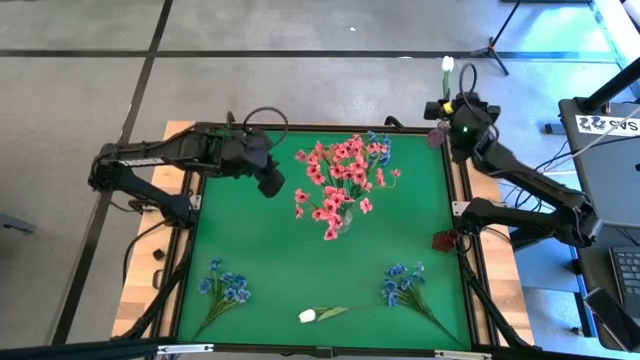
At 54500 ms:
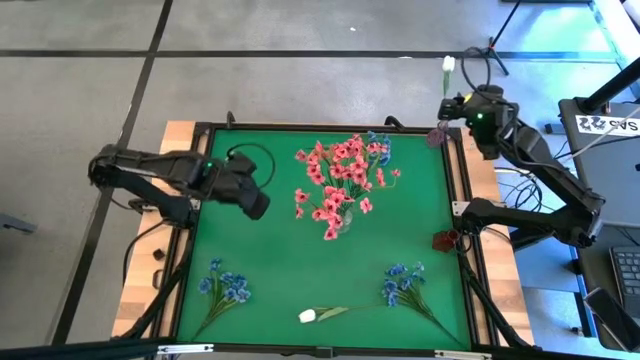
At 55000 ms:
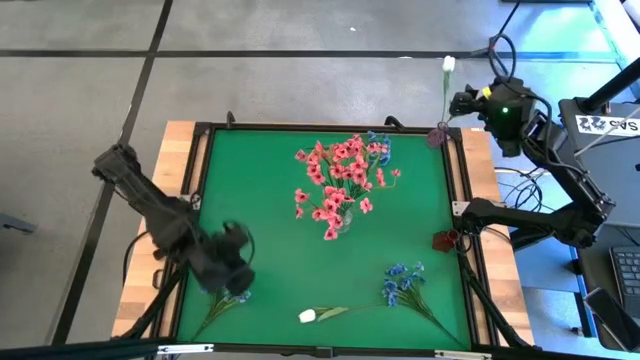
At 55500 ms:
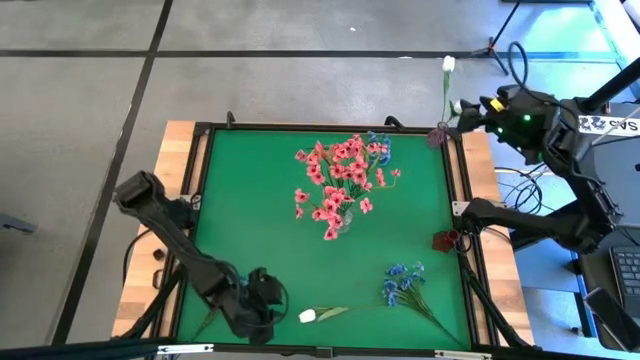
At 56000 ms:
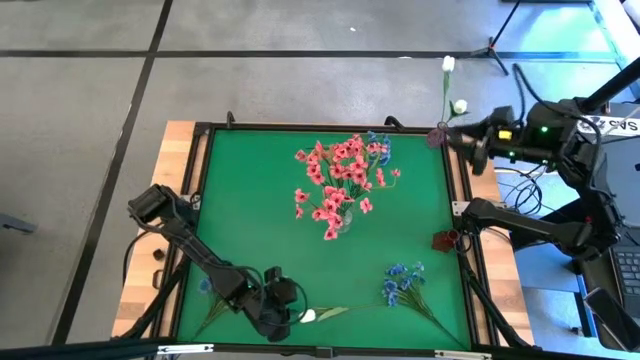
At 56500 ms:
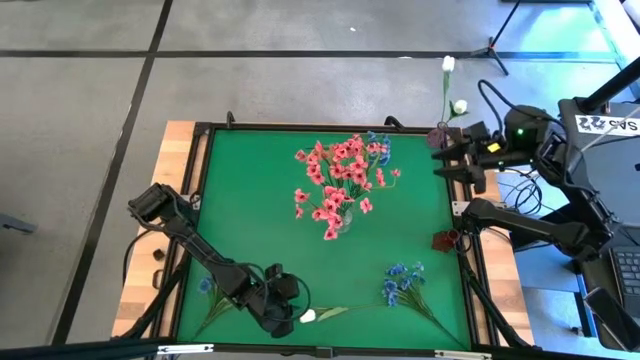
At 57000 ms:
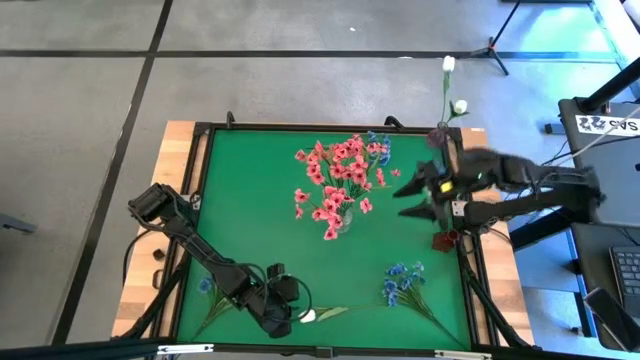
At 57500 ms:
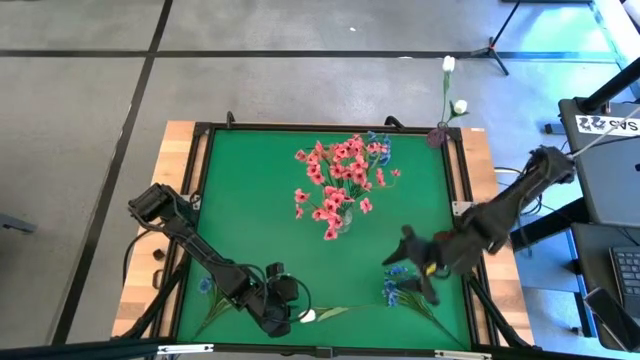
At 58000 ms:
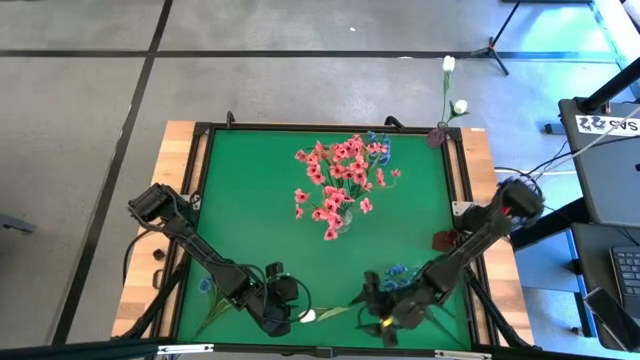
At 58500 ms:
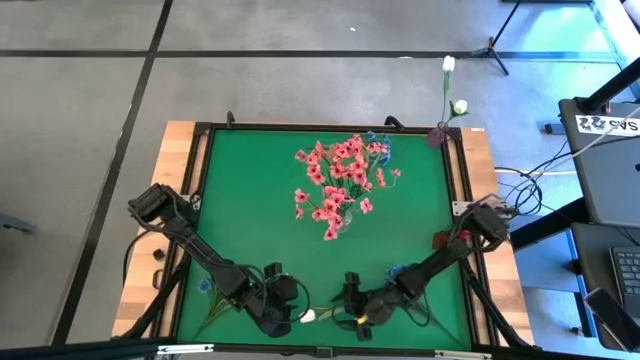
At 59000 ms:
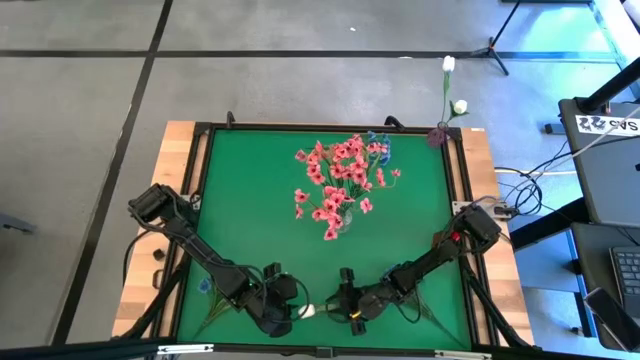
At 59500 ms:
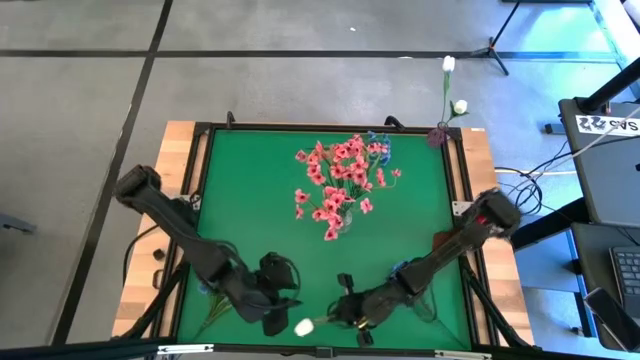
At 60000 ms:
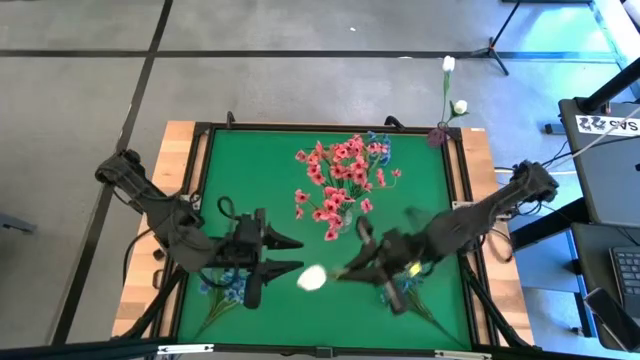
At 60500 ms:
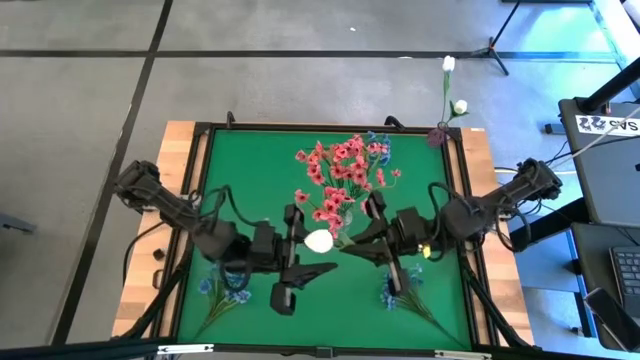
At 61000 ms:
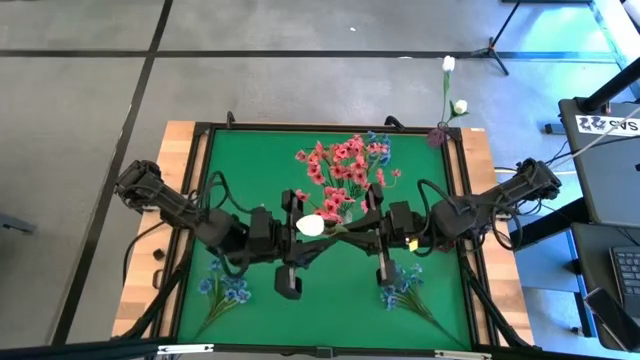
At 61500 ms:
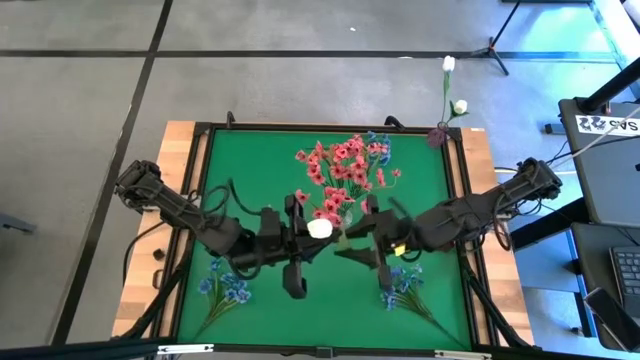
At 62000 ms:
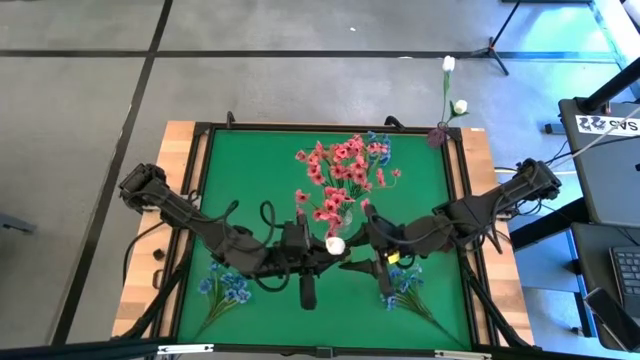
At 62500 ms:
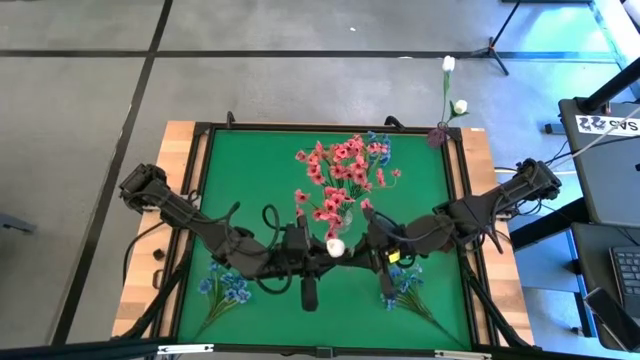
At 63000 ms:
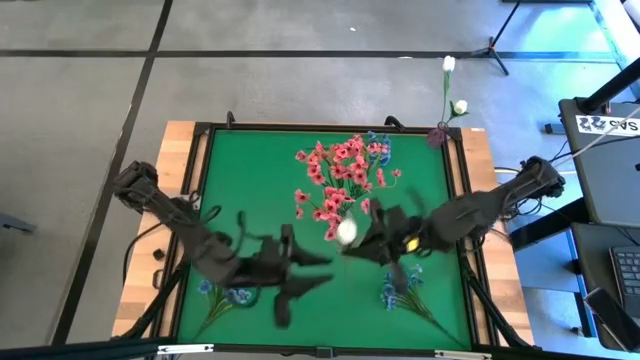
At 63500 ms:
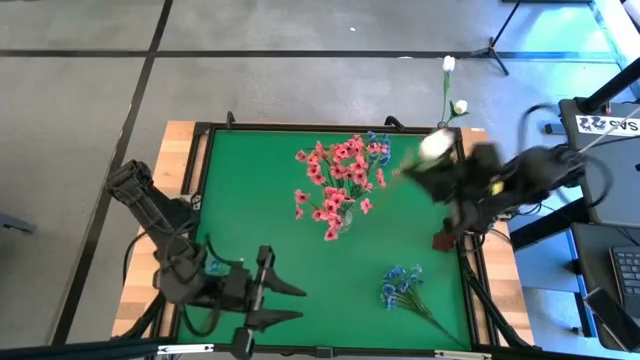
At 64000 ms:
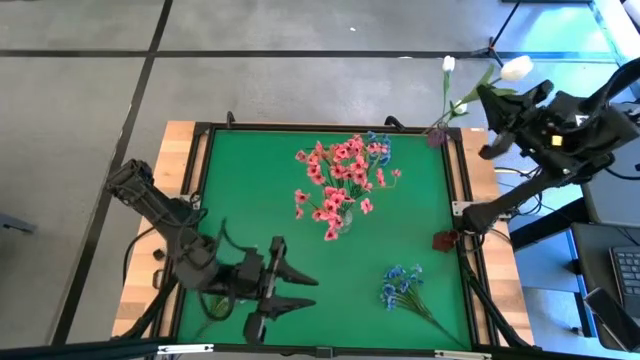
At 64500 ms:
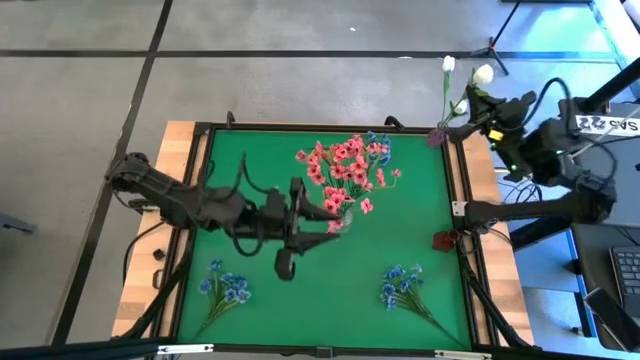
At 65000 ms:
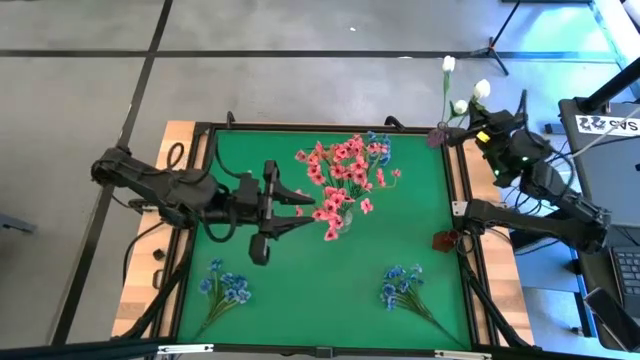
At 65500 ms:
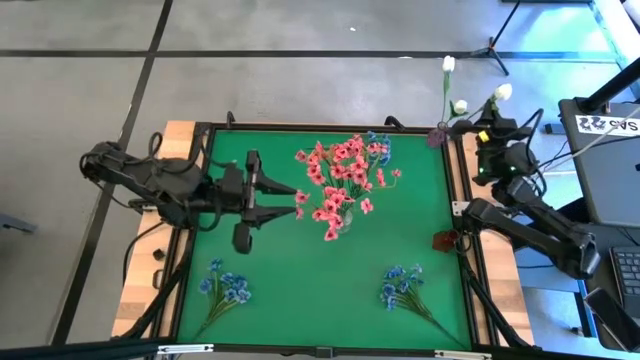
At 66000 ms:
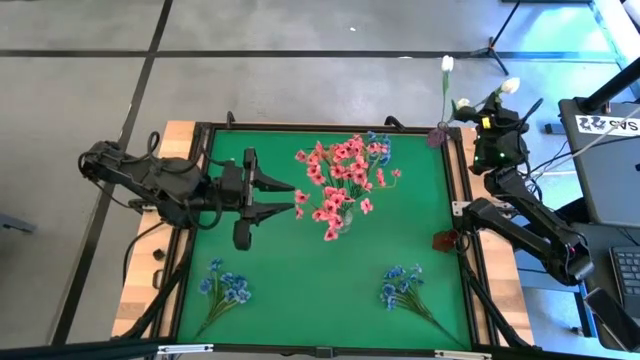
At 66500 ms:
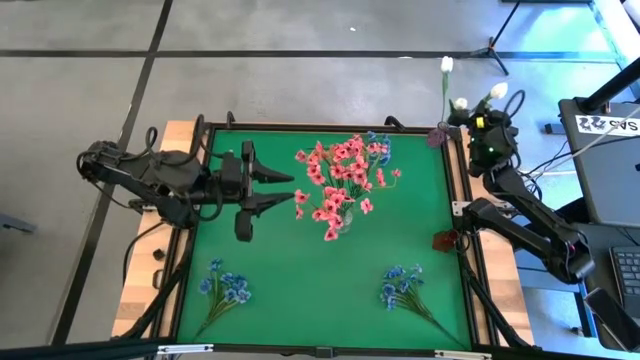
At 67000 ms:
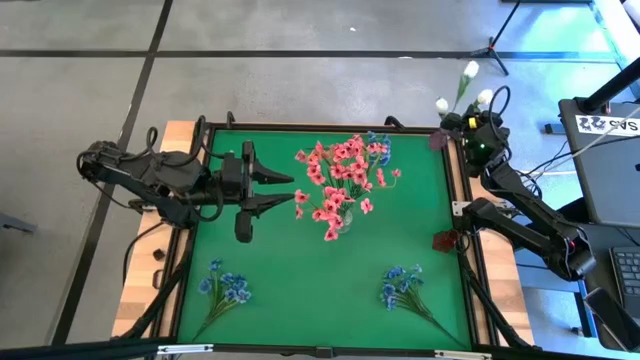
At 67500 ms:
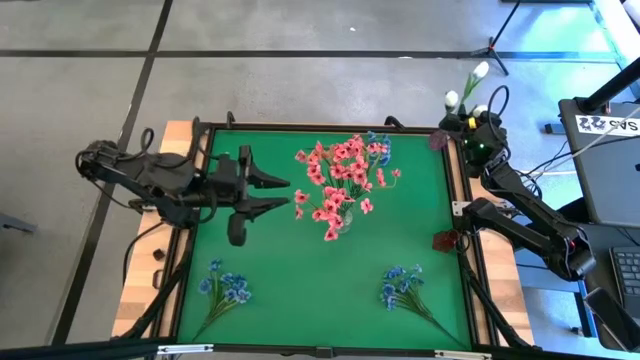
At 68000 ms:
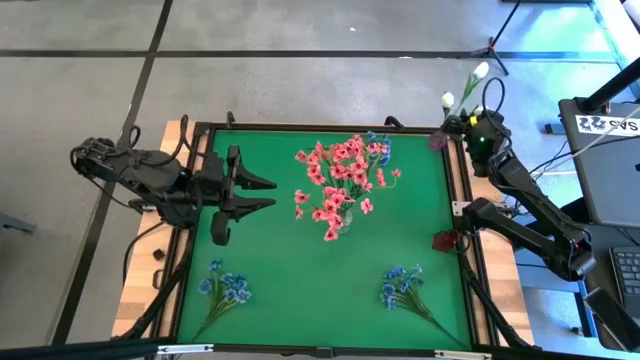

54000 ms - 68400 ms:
Task: Sort flowers into vase by color
Put the white flower into the purple vase

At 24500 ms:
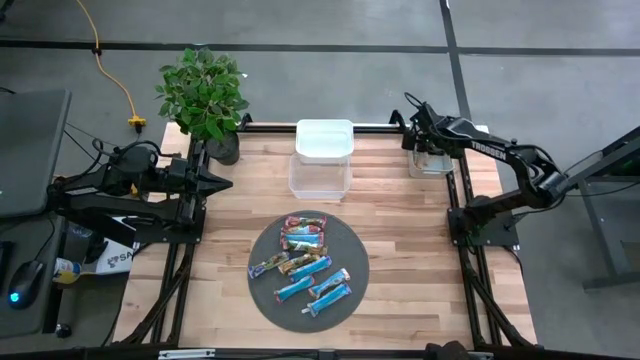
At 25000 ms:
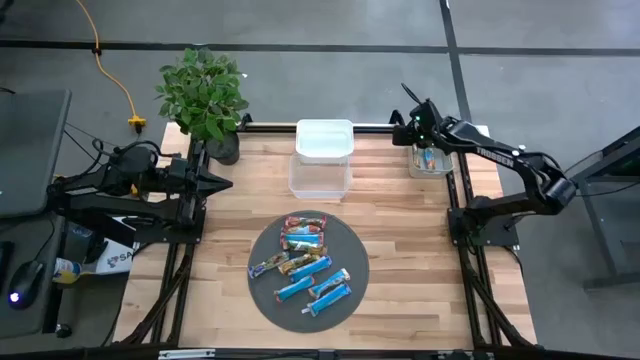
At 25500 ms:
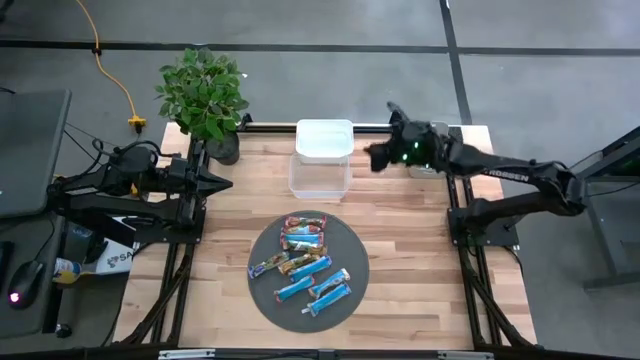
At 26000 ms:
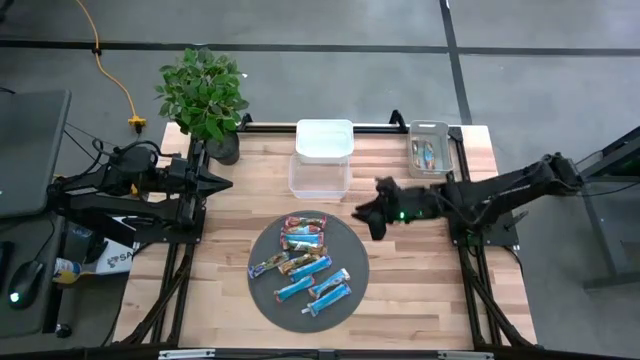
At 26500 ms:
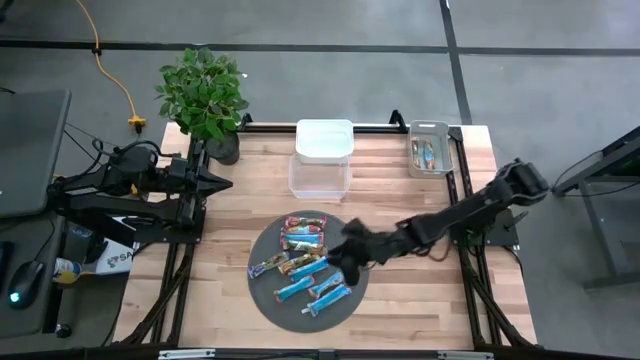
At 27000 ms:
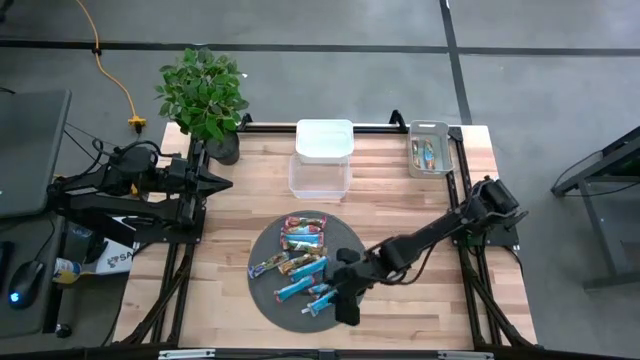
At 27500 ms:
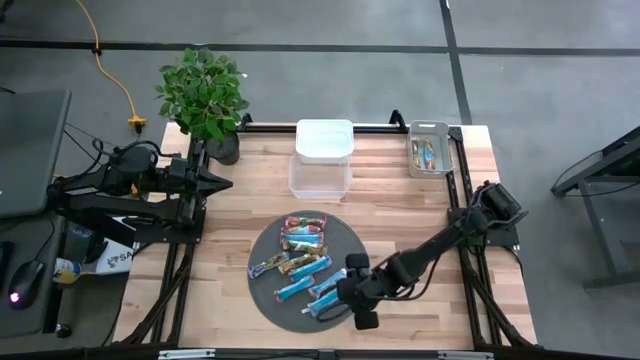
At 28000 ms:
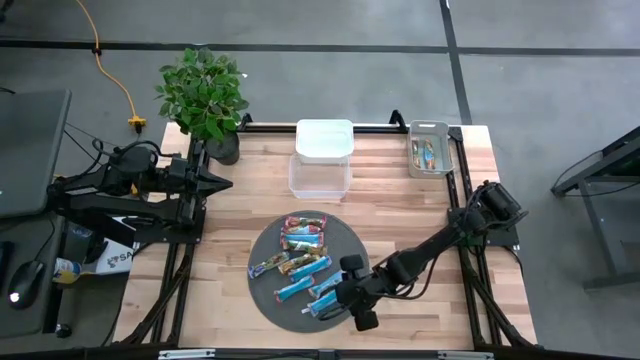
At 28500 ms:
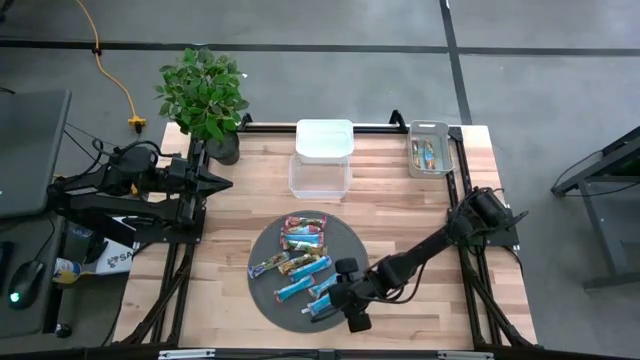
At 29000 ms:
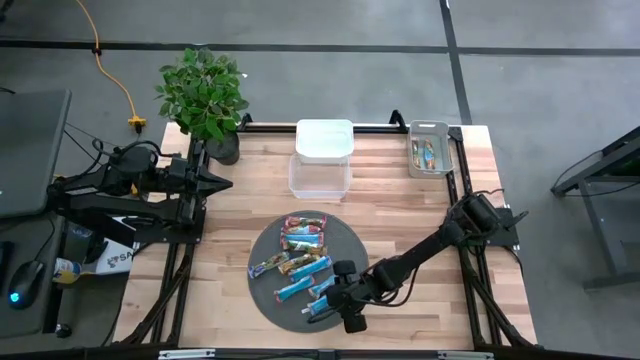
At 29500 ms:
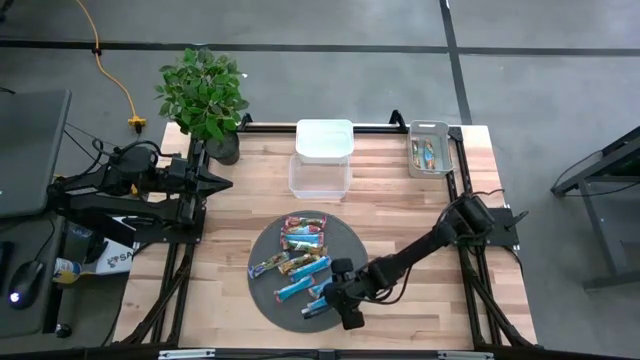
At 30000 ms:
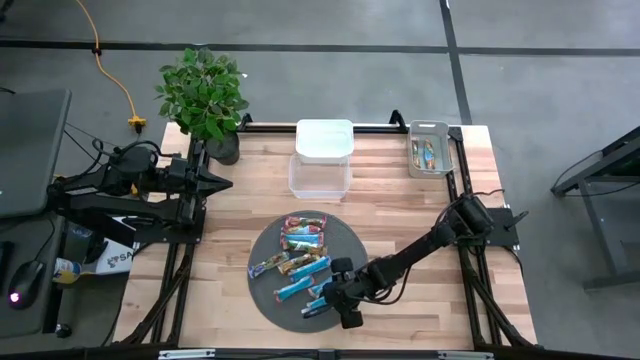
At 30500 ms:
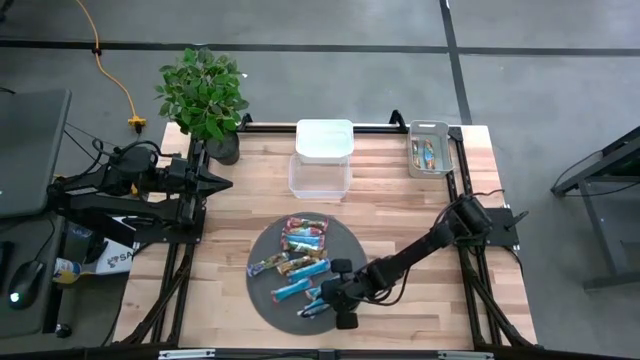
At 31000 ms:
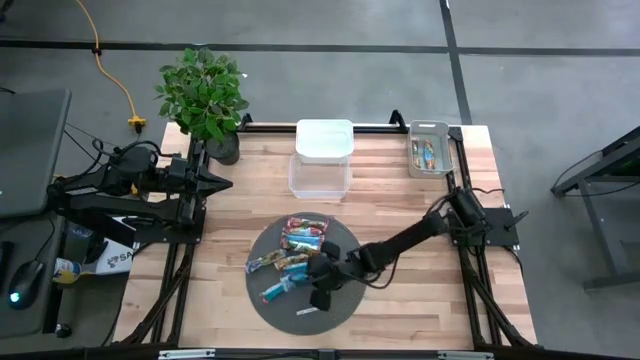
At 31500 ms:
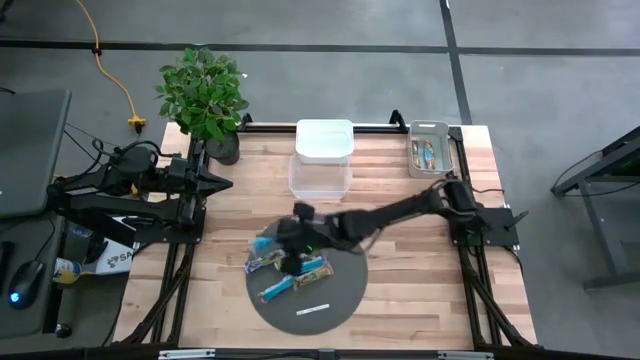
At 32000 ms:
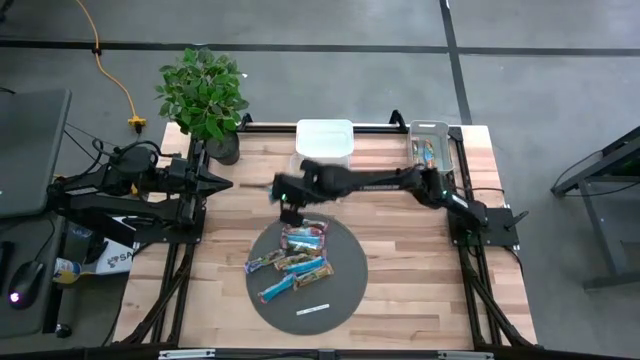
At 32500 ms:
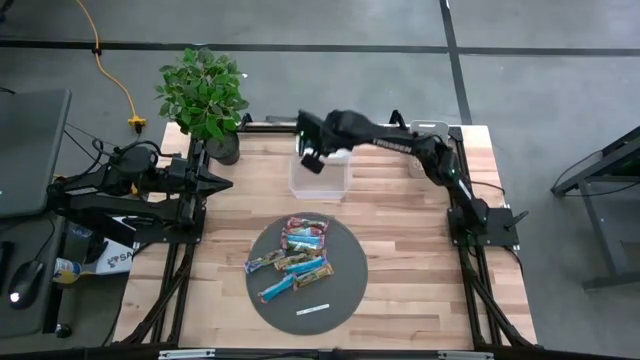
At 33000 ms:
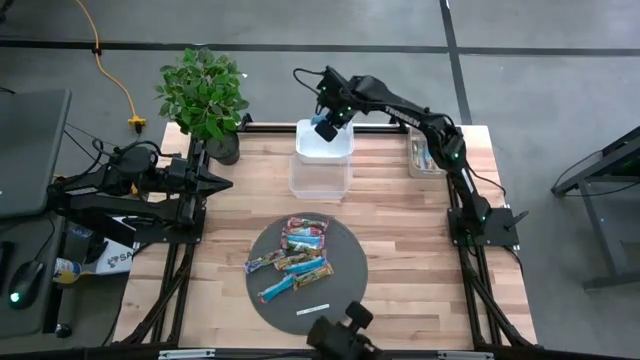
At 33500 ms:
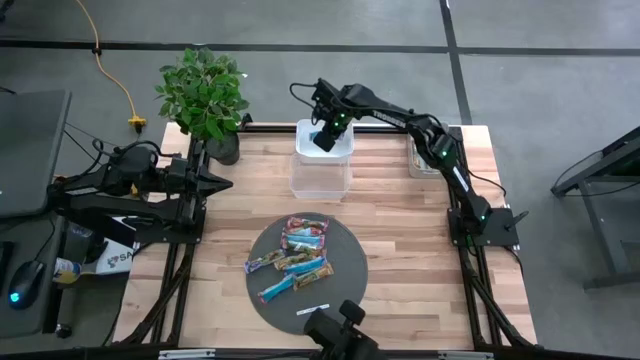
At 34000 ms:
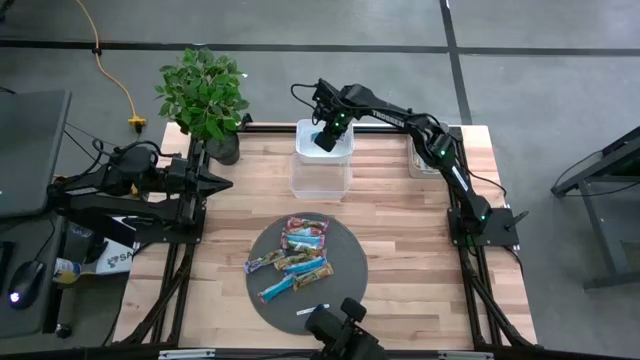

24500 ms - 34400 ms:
Task: Pick and place Granola Bars by type
Put the blue granola bar into the white bin
